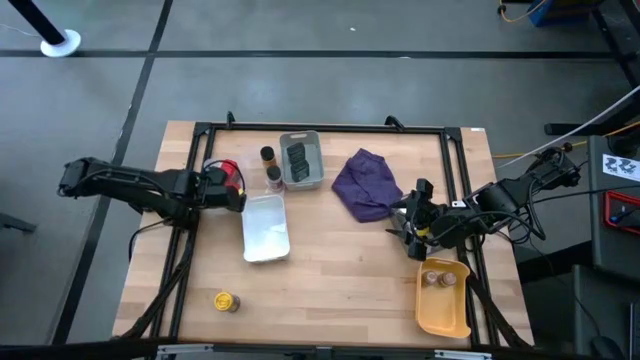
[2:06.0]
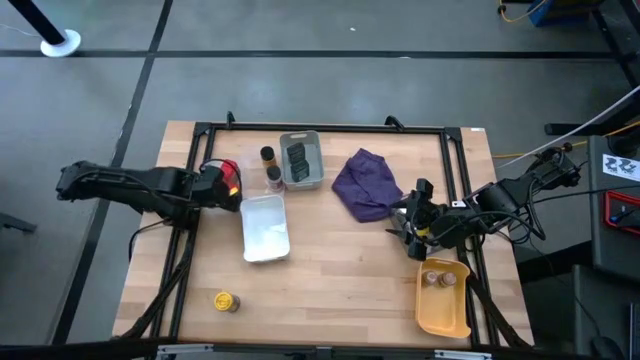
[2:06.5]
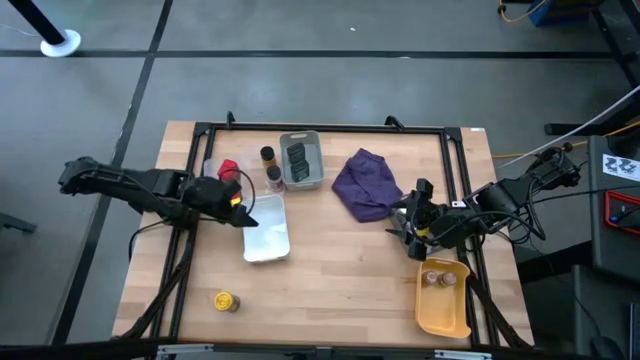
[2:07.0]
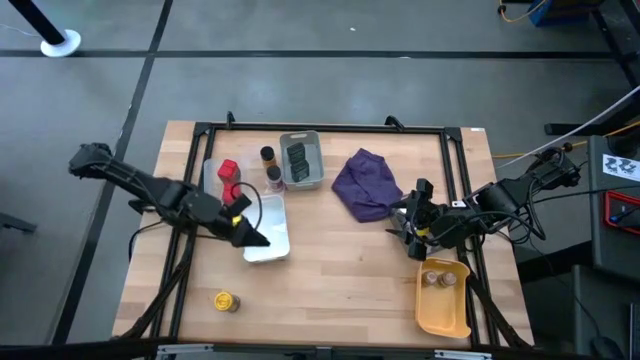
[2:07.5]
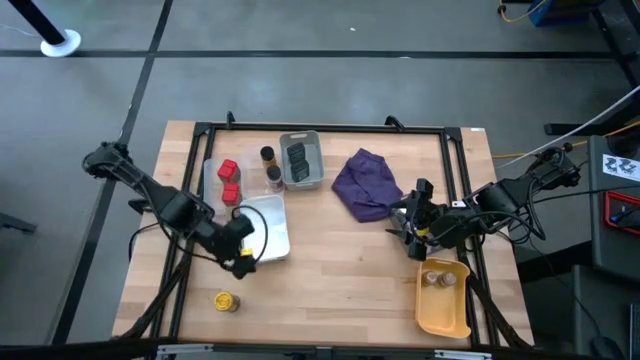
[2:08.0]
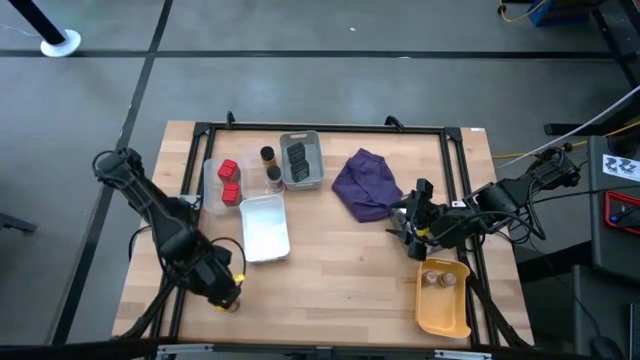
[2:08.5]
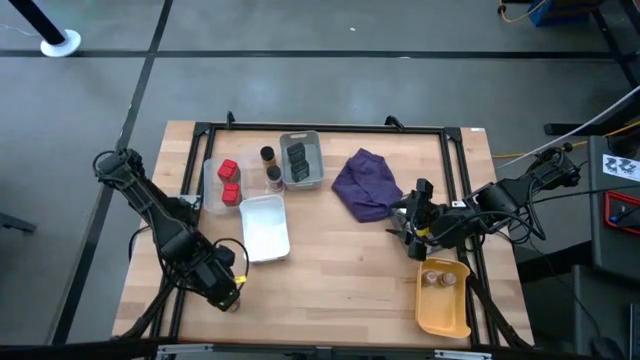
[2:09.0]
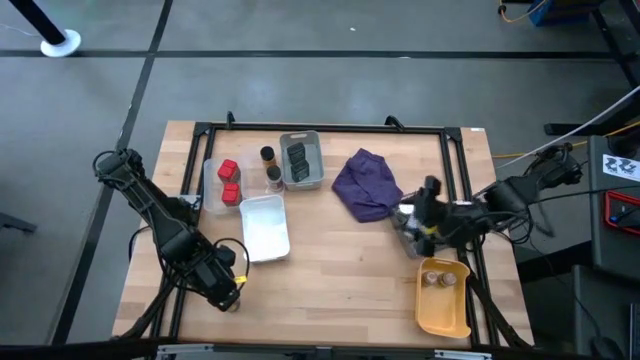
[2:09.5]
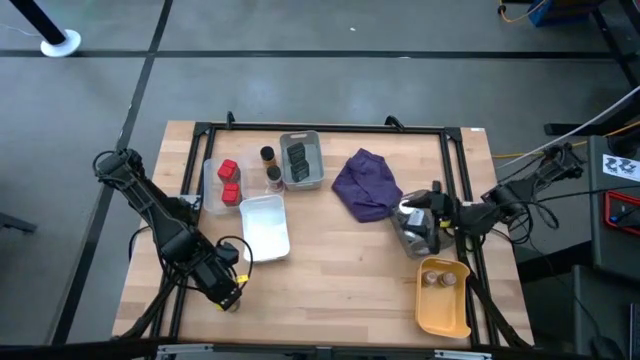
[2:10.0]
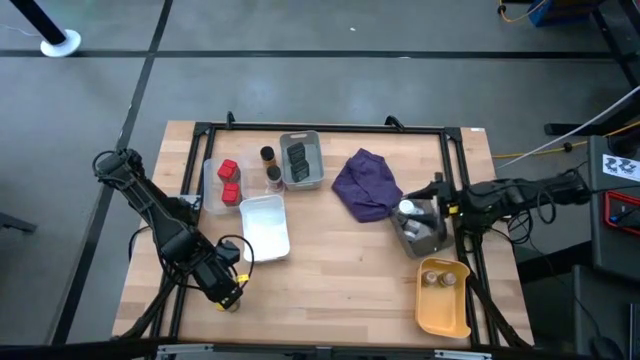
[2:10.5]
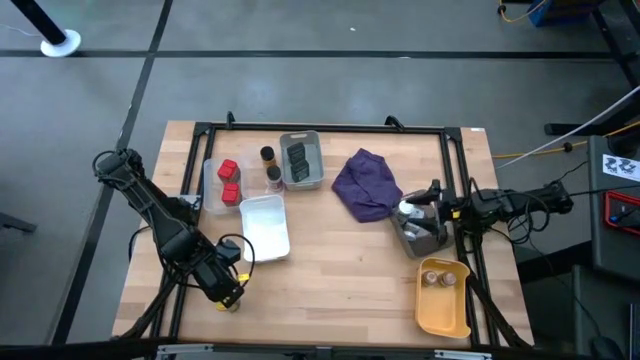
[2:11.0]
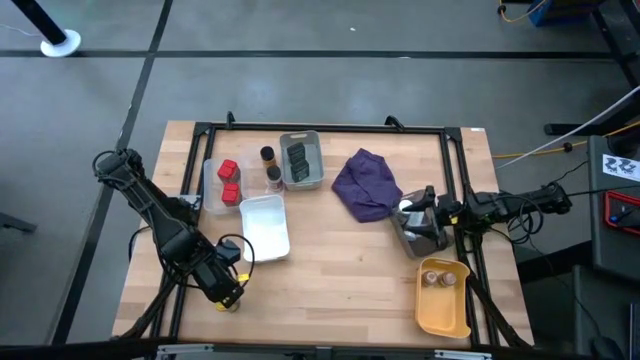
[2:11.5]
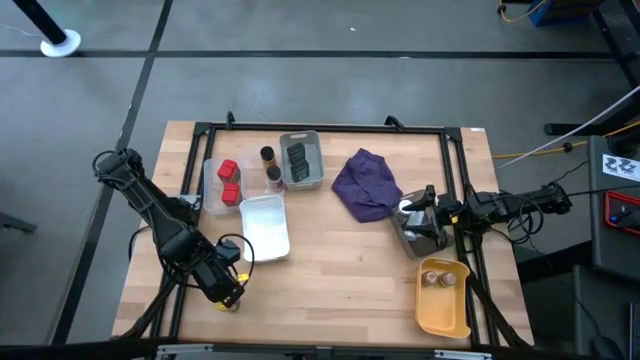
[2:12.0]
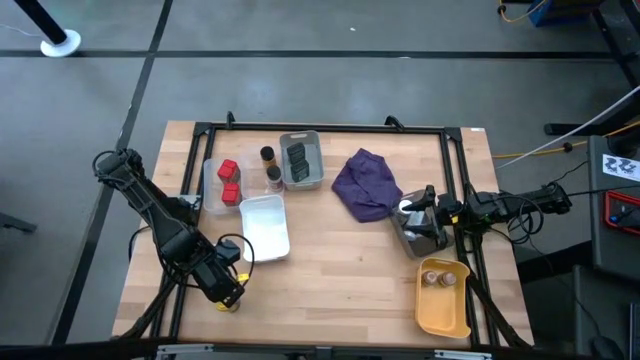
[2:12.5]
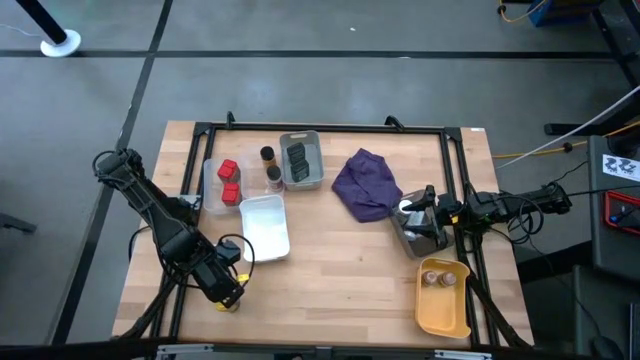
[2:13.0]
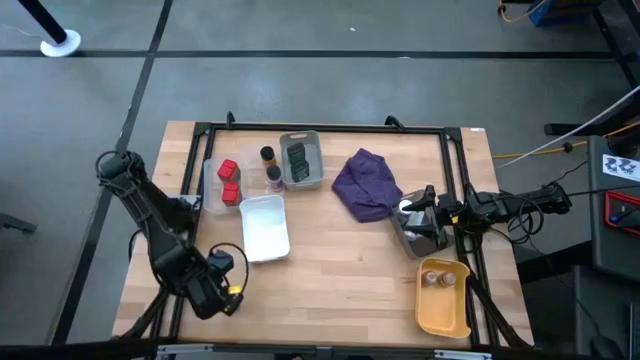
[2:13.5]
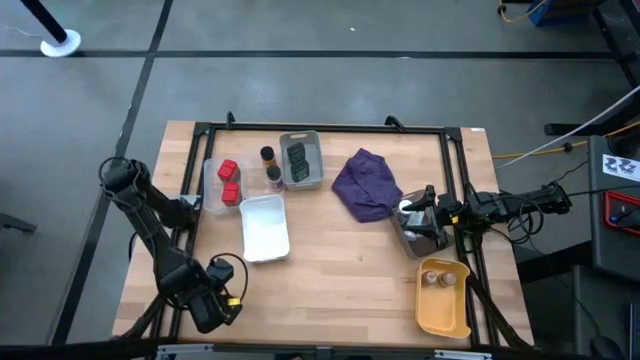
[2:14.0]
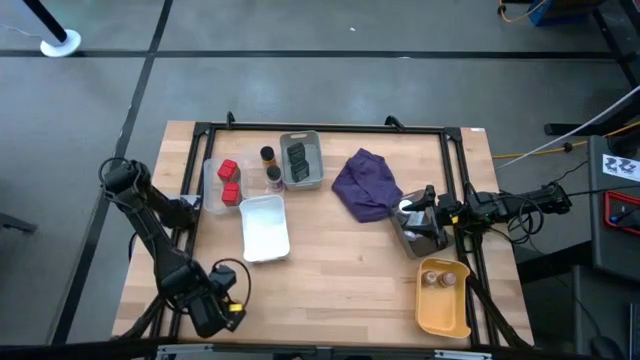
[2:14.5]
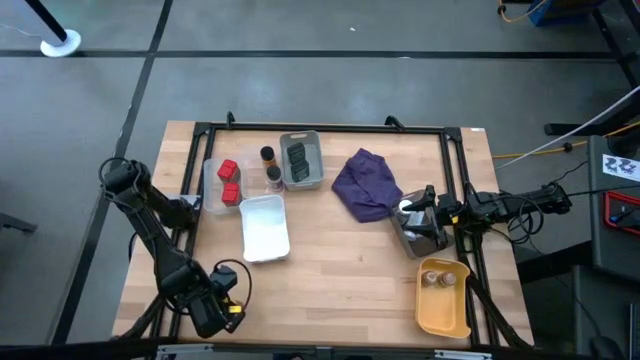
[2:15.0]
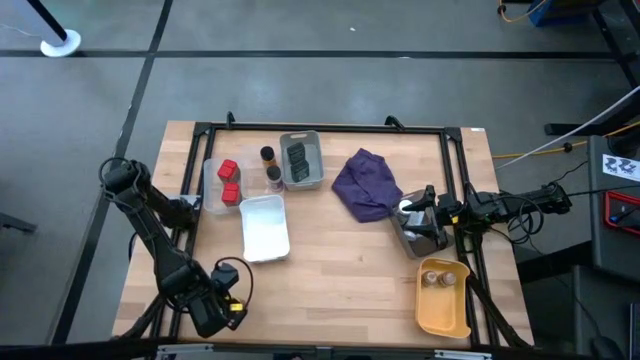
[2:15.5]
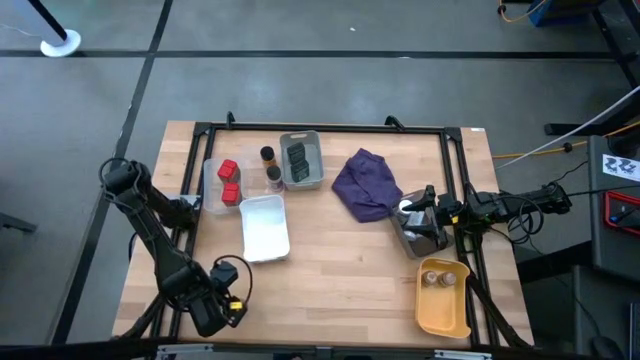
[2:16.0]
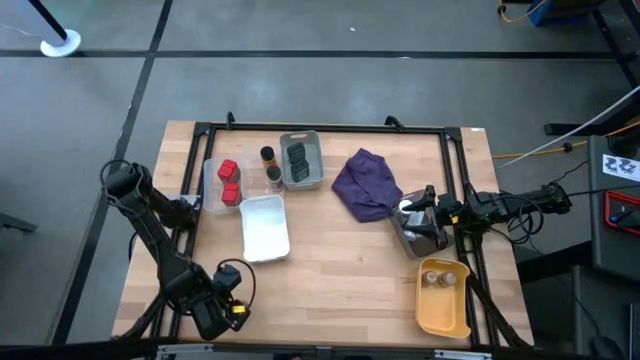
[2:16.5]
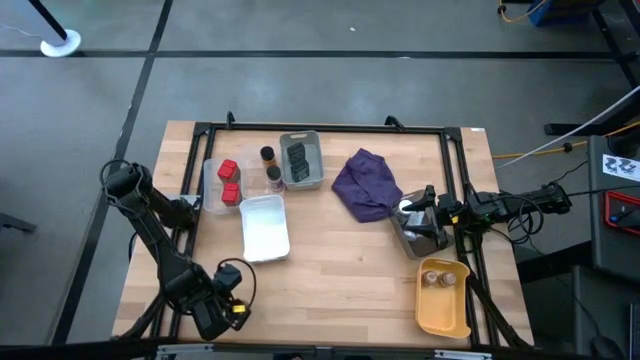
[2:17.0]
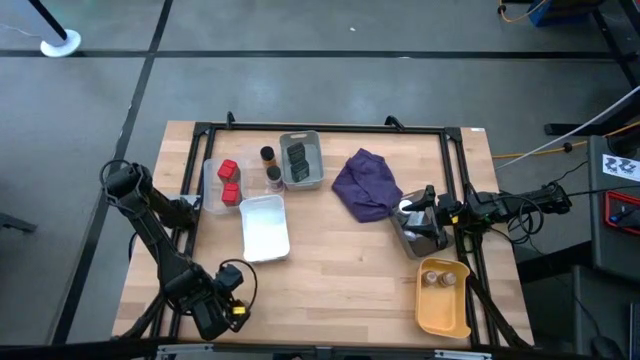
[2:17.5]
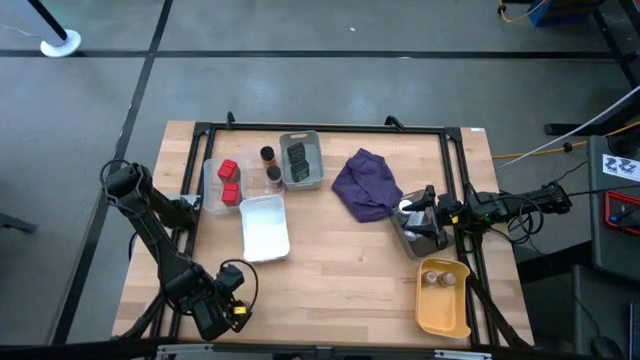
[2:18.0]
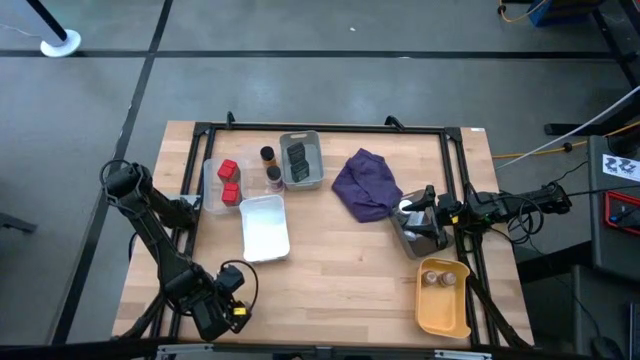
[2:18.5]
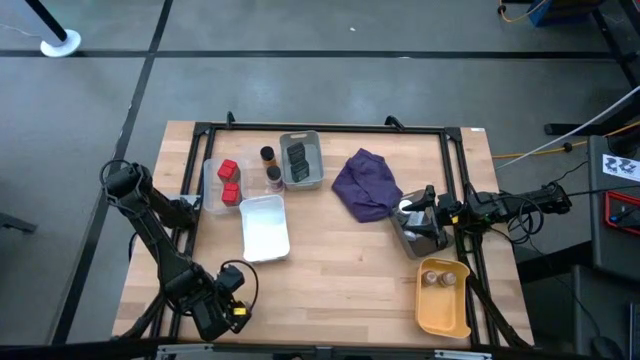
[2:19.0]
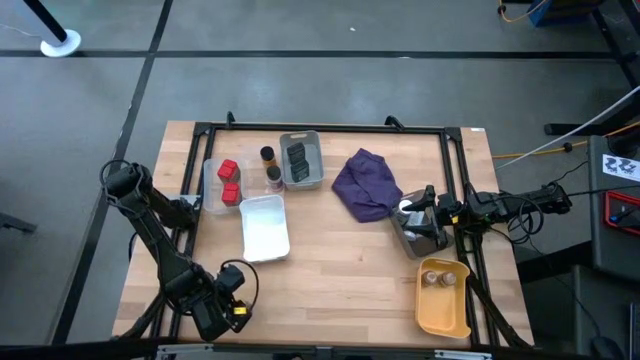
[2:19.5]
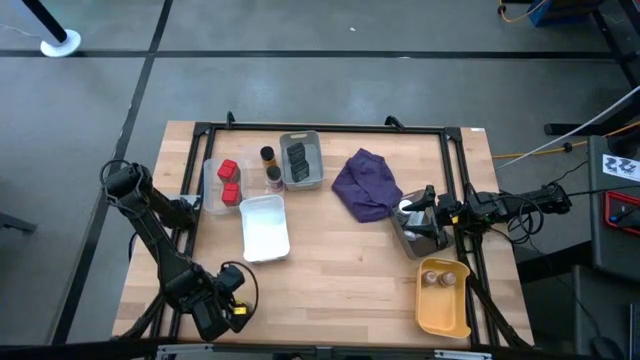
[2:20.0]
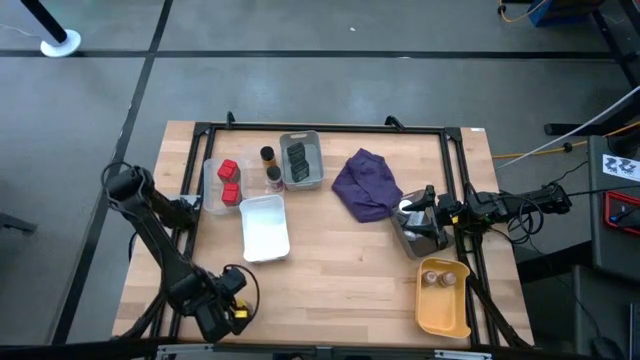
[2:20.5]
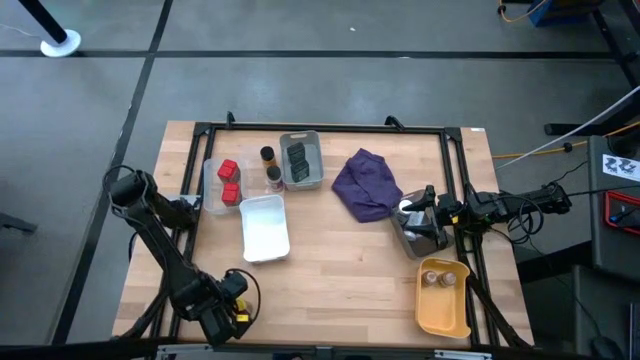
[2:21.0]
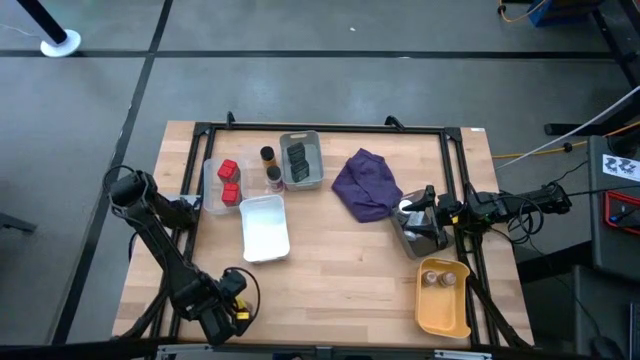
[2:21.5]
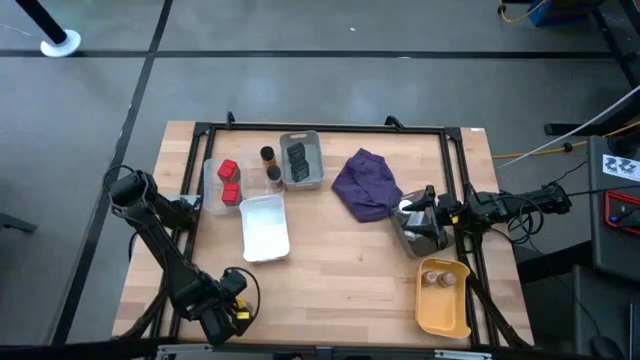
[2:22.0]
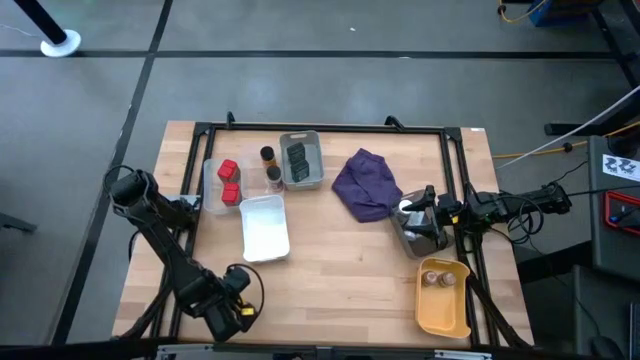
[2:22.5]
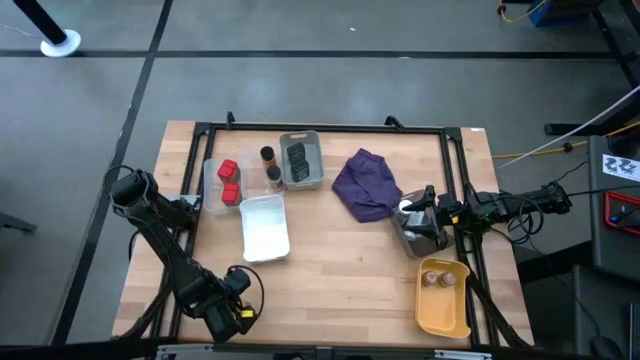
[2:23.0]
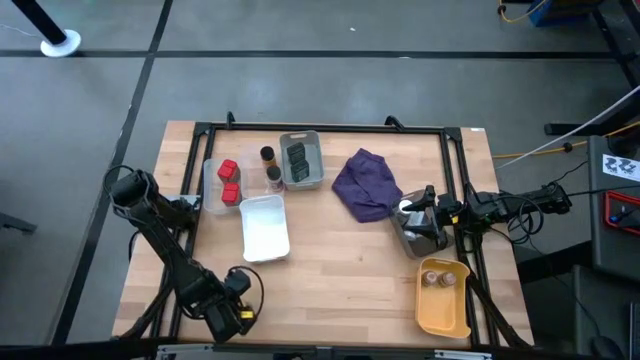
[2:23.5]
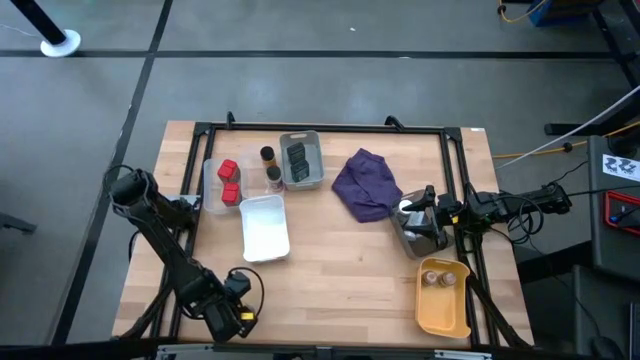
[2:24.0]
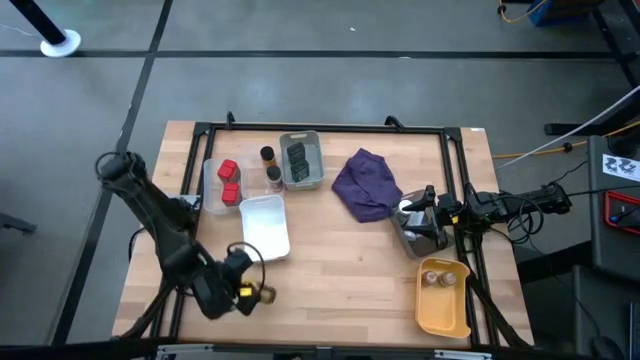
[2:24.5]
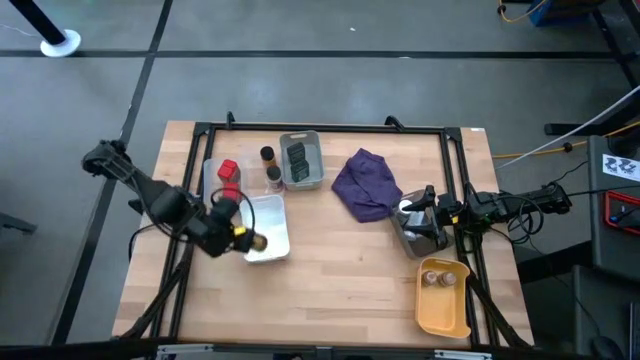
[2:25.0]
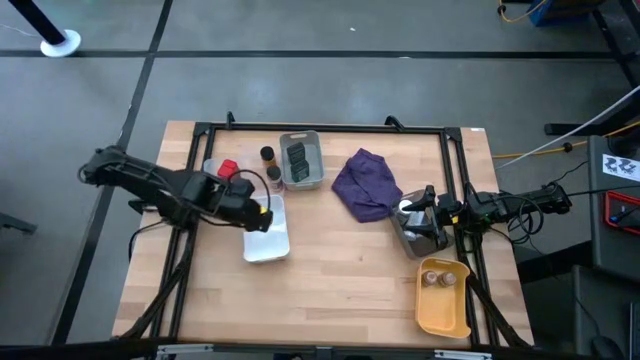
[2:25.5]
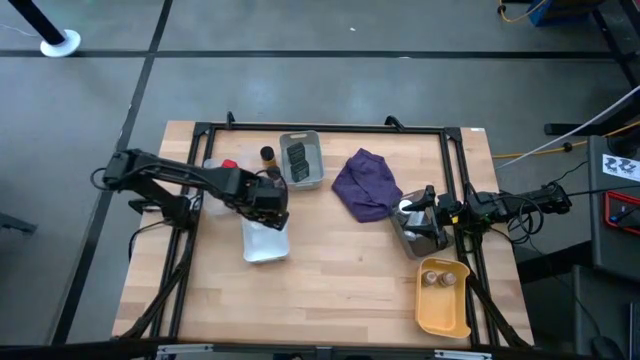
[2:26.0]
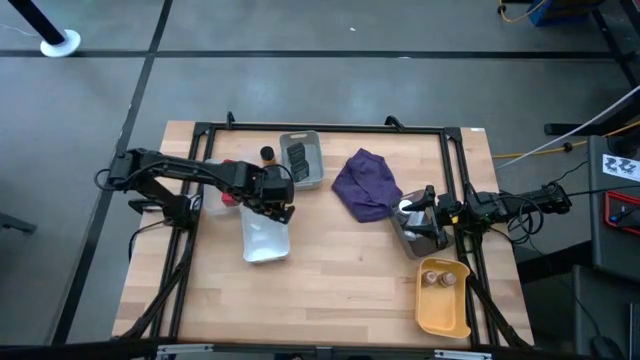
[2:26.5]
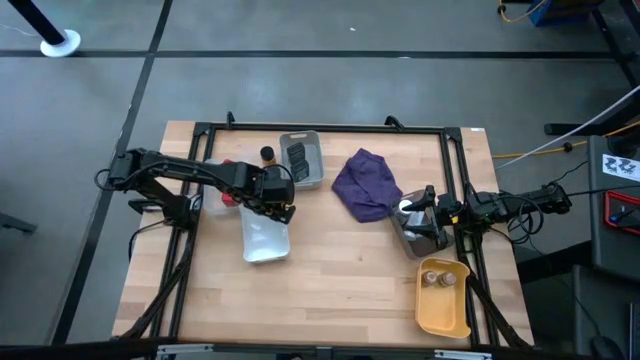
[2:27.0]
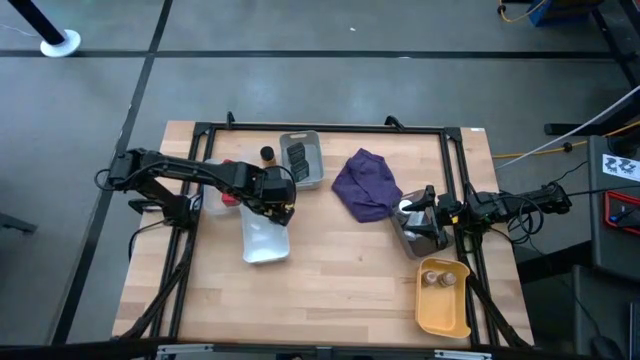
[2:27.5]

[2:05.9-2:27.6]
Task: Sort spices by type
Put the yellow seasoning bottle into the white bin
